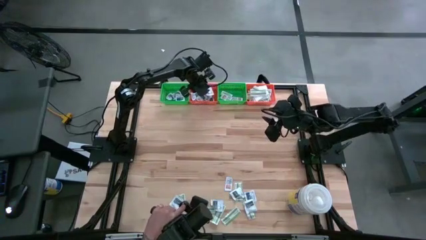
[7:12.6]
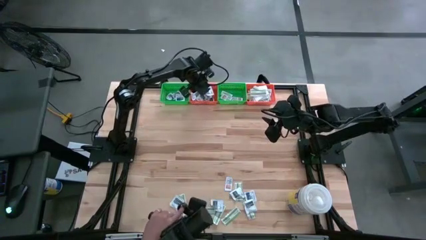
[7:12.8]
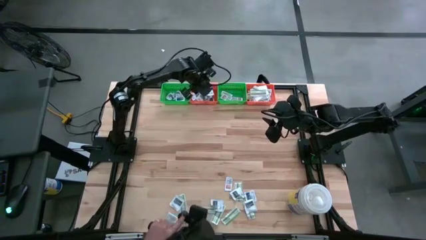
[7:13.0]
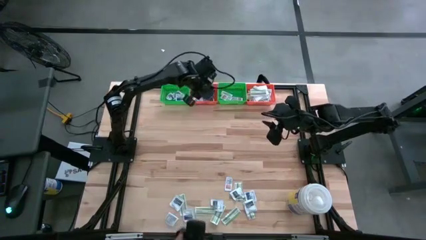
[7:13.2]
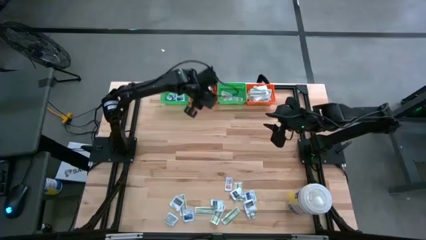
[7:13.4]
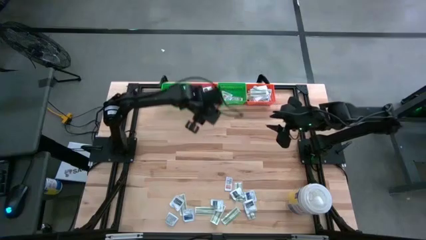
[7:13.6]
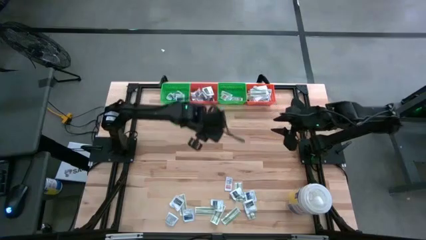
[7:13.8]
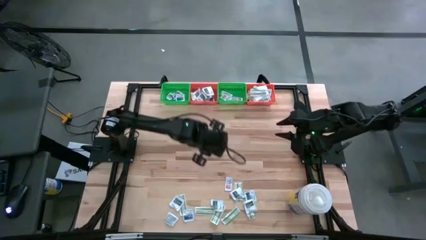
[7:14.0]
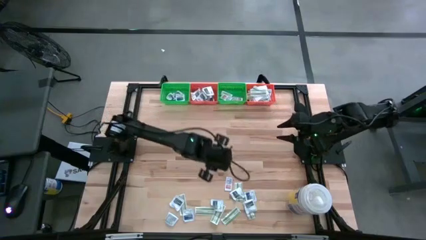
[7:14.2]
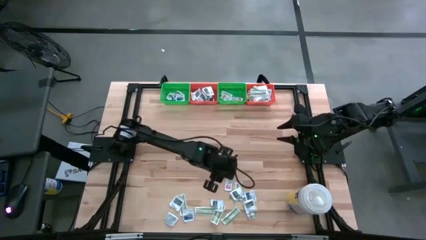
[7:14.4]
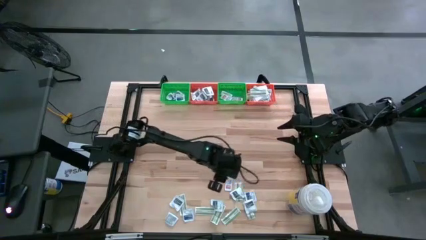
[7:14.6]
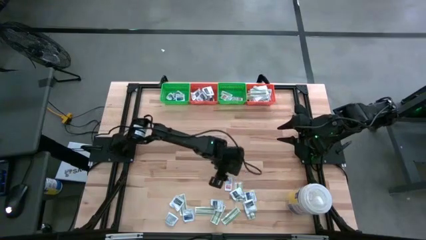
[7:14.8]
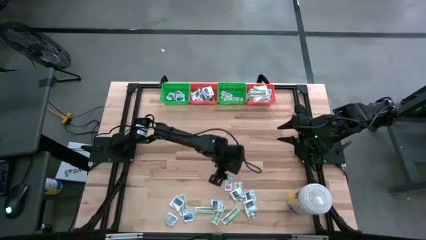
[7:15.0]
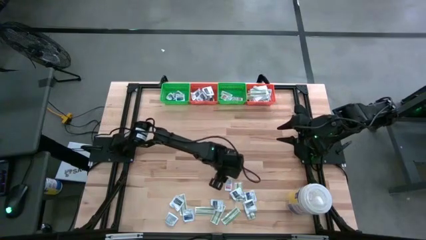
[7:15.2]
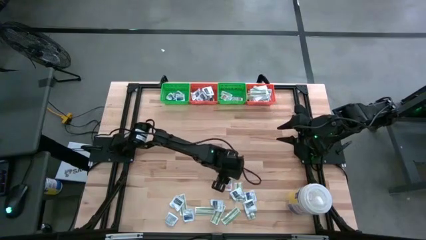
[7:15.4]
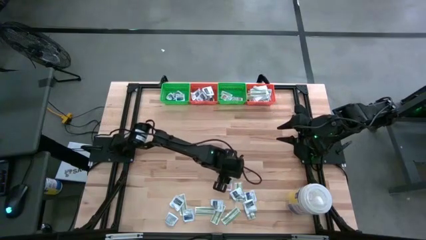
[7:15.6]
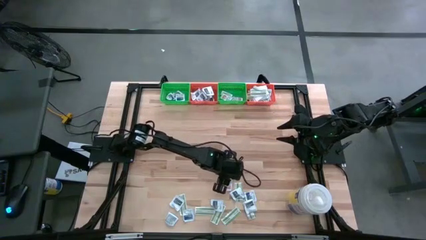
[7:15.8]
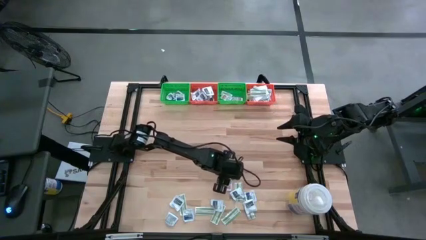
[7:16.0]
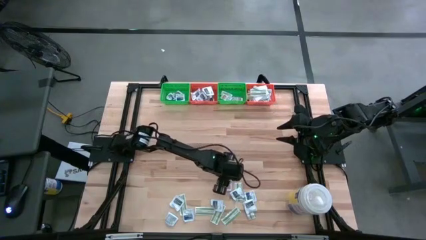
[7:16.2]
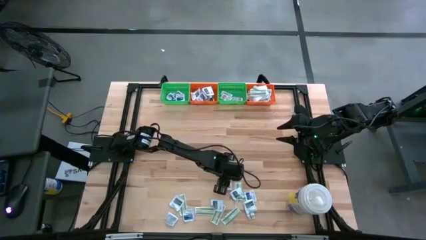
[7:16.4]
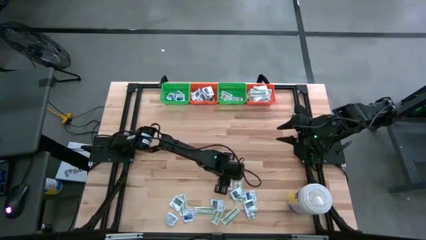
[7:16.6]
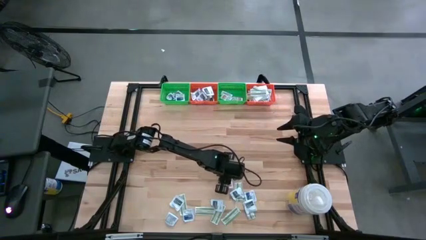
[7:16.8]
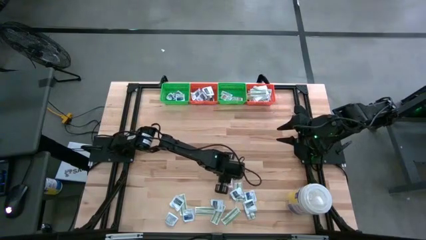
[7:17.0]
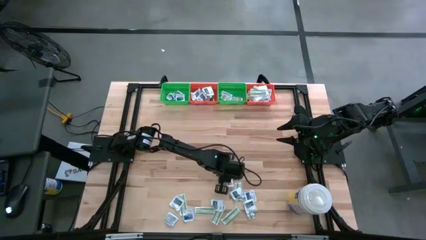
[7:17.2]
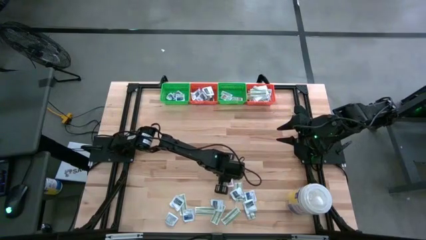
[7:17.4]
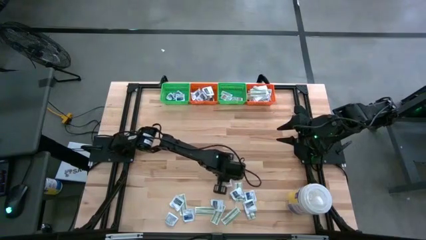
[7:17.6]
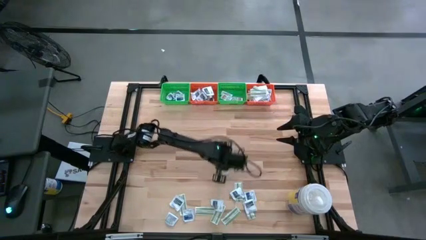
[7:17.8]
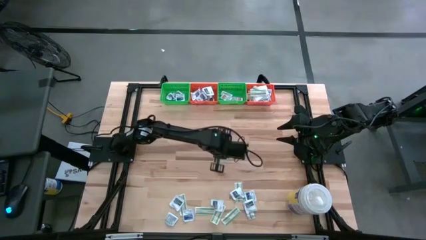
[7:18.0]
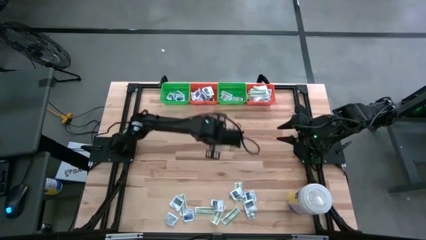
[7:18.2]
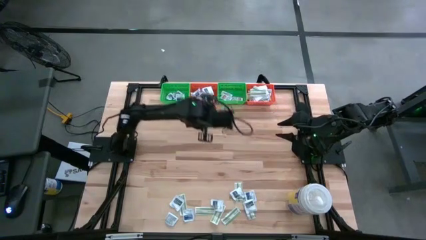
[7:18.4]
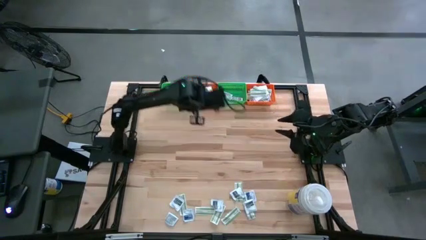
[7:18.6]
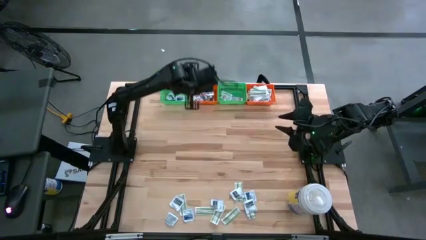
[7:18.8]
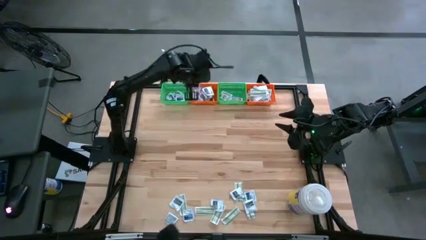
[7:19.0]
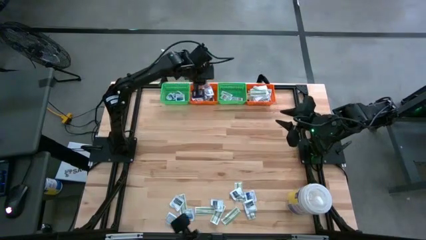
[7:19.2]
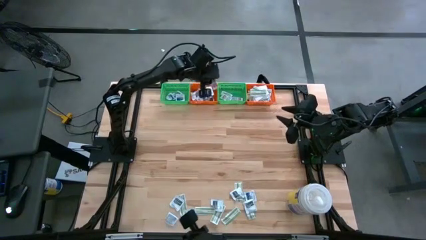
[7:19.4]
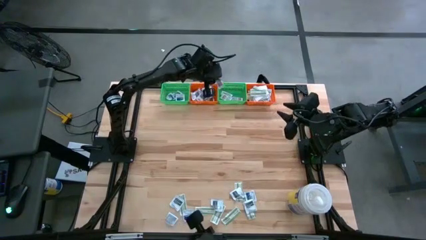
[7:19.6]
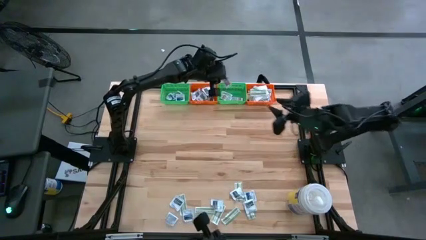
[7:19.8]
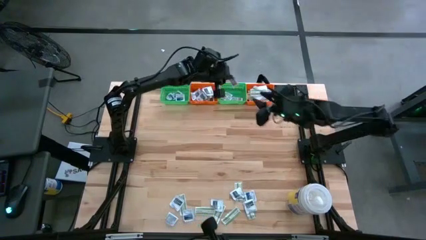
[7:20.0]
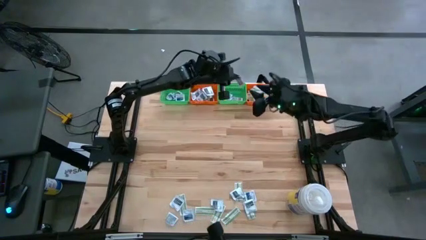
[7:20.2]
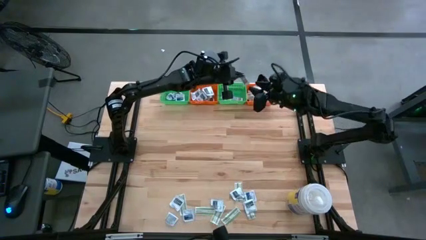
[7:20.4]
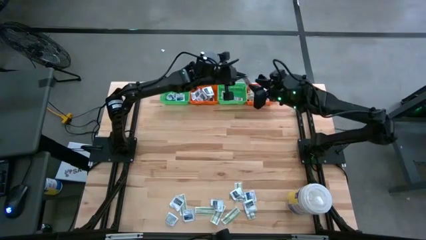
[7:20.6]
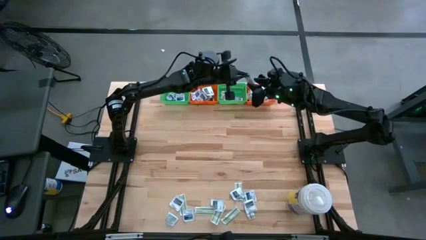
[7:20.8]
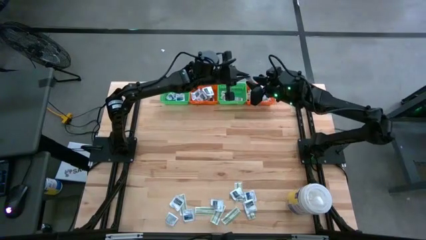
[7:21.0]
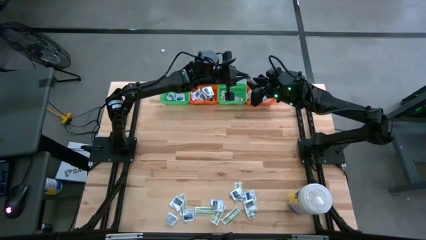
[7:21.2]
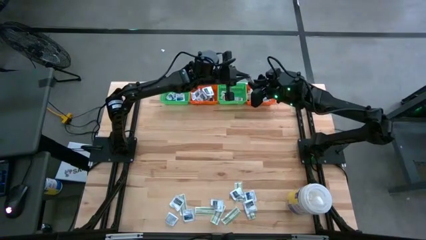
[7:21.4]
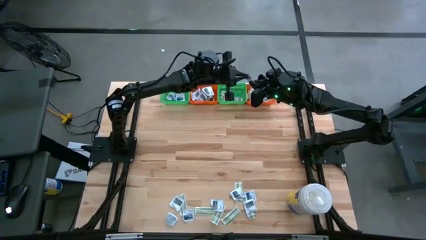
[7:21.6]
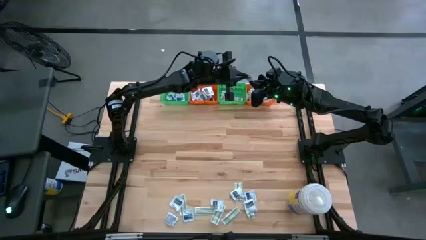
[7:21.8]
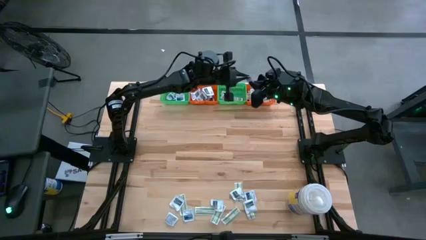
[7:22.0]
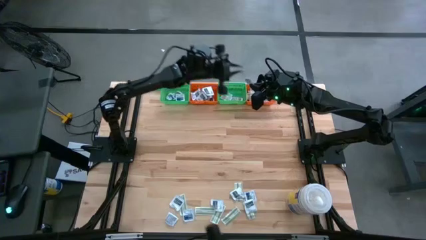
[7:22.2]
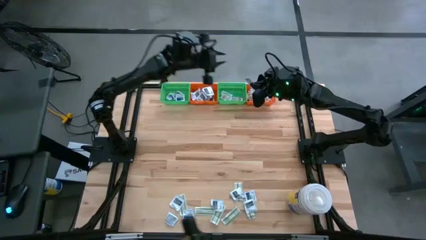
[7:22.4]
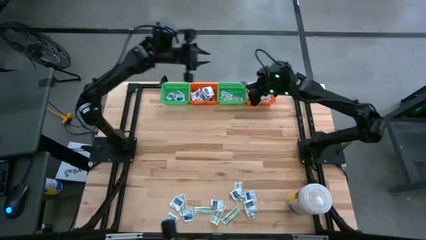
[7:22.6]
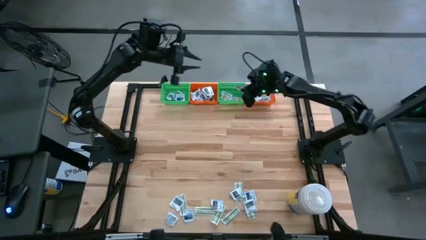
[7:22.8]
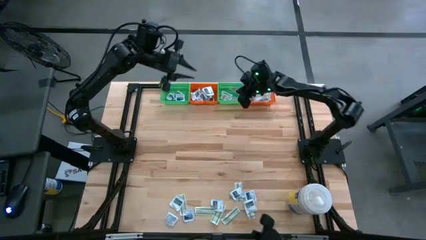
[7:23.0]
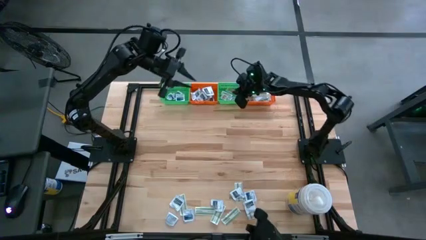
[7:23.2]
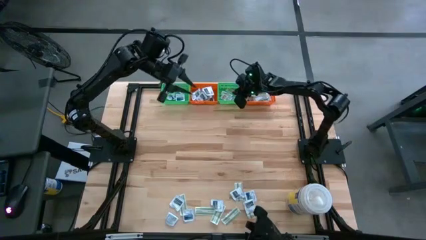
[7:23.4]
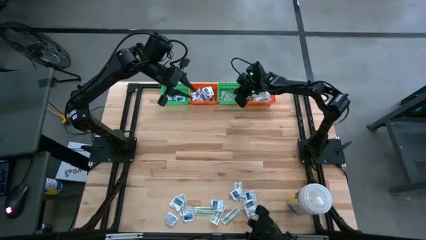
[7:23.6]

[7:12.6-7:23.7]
Task: Pick & Place First Aid Supplies
Put the orange ointment pack in the right green bin

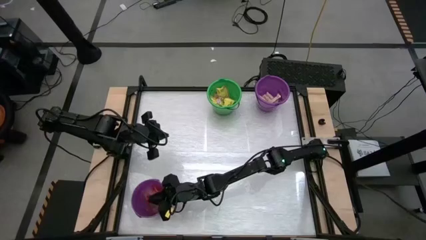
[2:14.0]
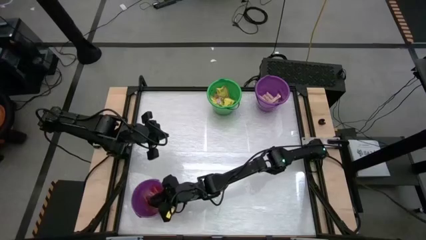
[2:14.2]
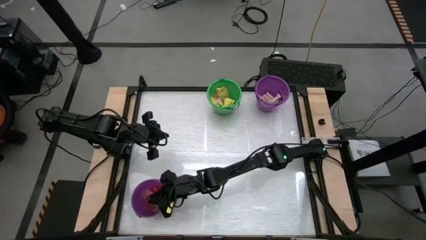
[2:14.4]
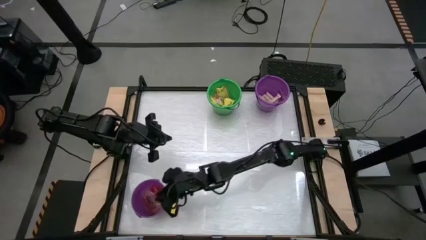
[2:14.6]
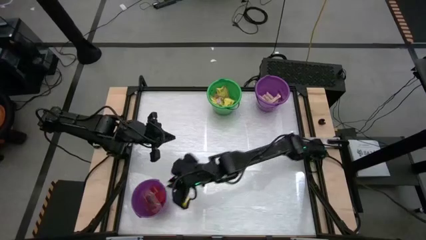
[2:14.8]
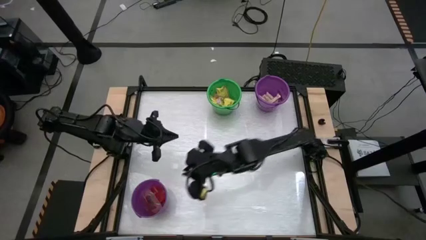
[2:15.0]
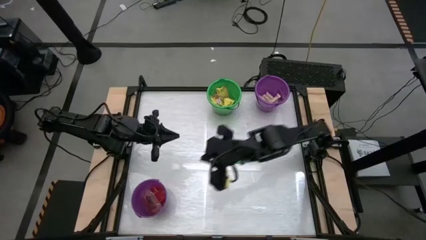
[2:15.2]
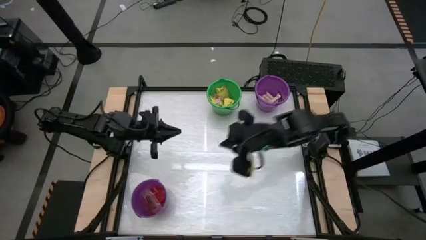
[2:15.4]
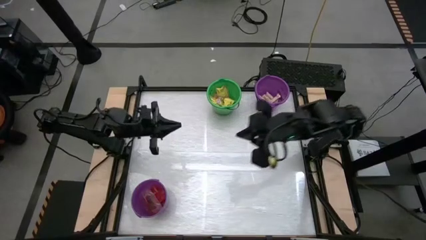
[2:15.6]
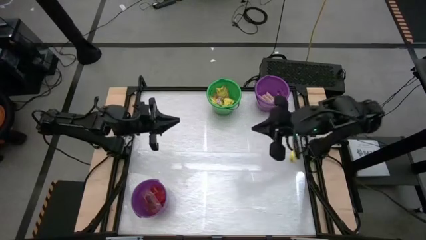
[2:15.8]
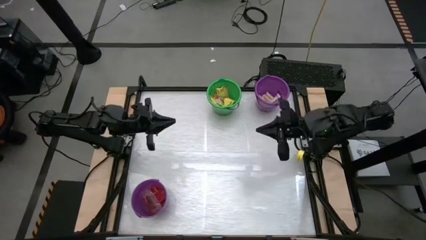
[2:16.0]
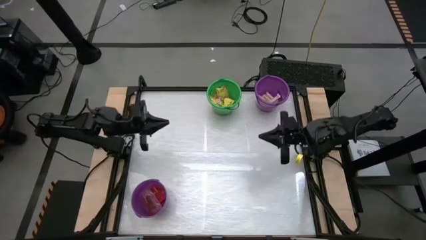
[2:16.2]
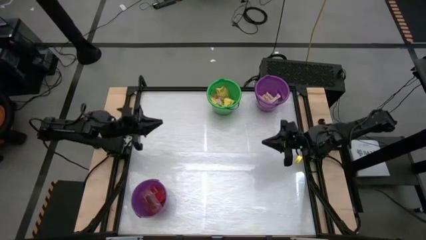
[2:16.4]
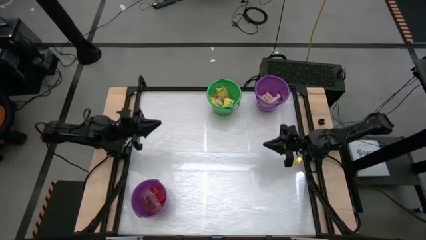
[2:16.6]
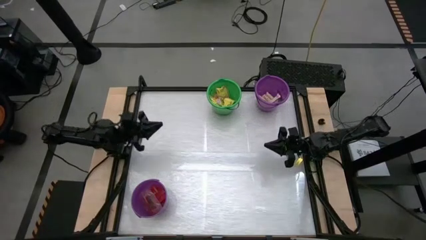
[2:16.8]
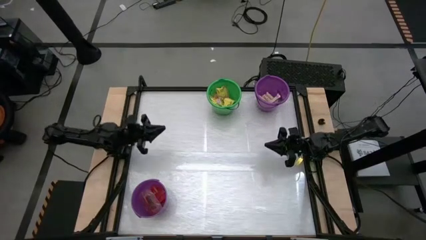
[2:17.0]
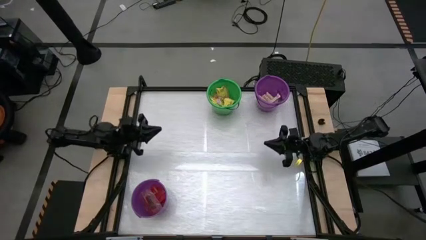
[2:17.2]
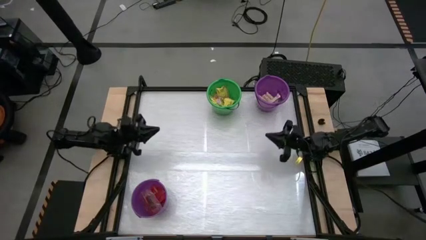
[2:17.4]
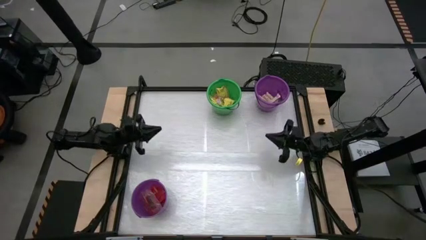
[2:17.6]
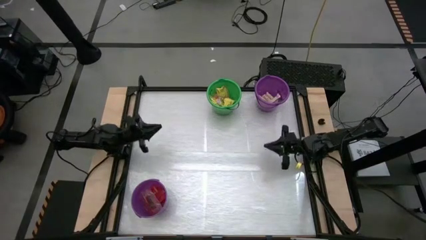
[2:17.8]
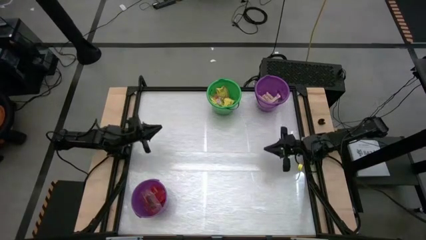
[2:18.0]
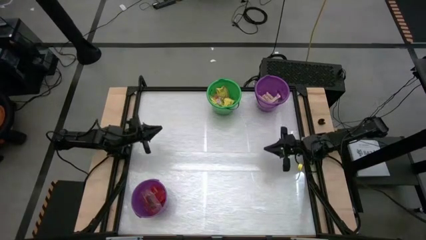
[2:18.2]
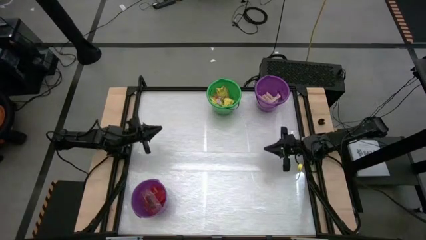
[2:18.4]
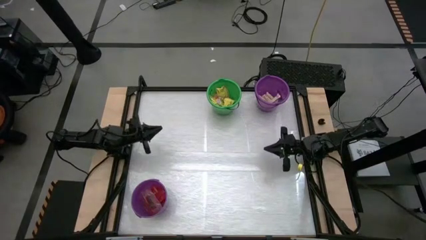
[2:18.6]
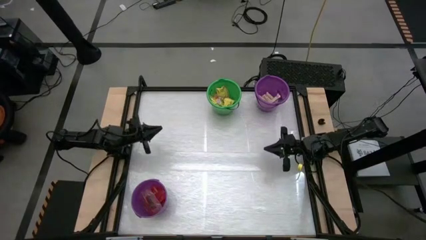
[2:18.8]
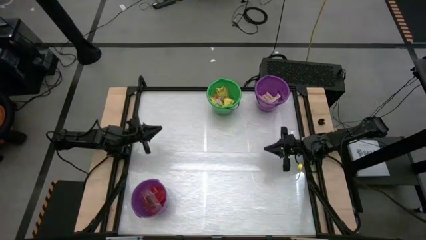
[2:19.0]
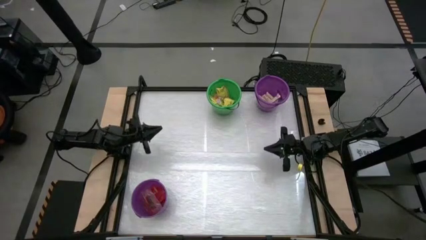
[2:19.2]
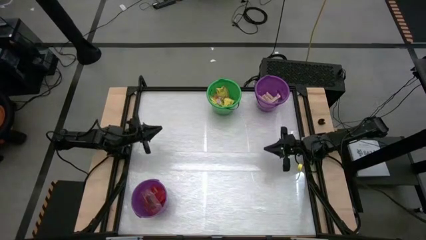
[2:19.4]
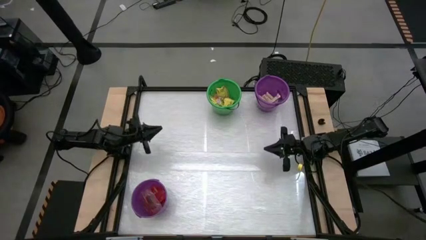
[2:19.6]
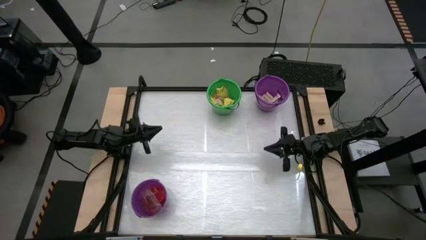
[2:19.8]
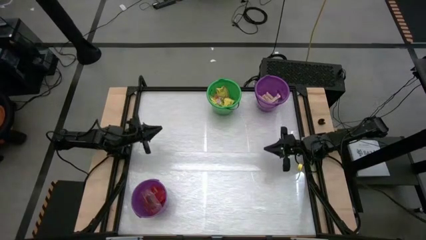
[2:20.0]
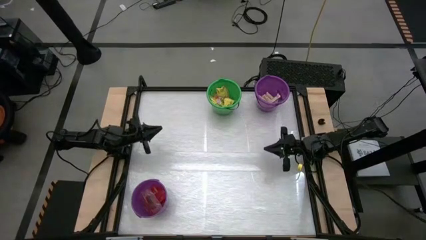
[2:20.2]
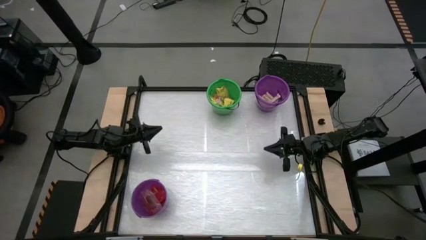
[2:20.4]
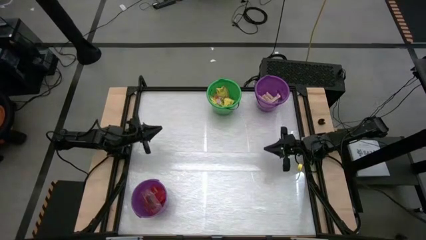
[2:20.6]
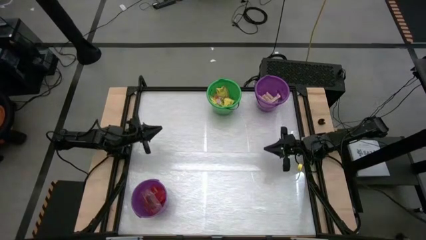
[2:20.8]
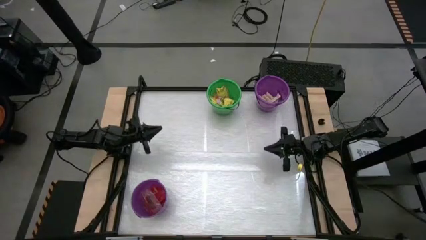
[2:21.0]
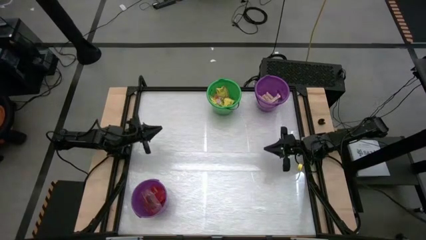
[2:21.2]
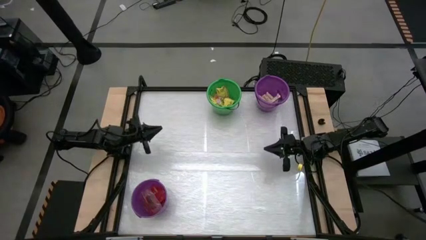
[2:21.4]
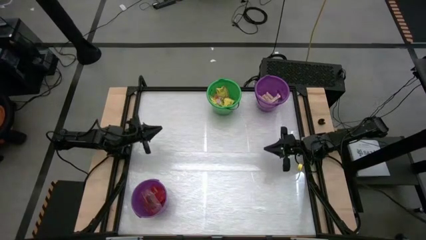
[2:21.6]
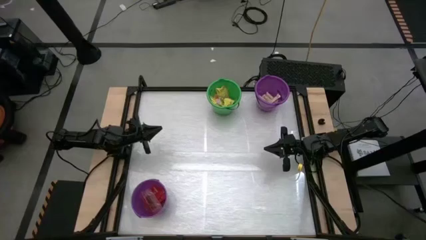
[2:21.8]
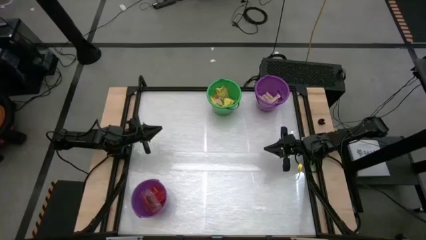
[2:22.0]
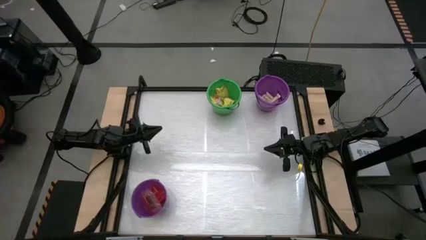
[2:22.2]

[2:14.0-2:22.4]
Task: Sort candy by brand, put in halloween buckets
Return to Home Position
